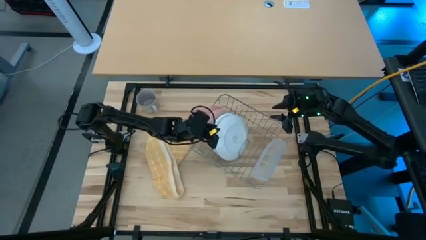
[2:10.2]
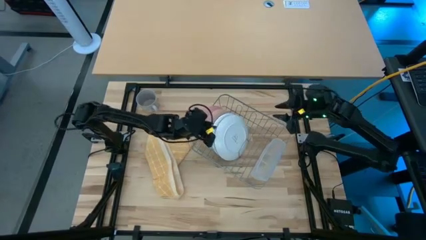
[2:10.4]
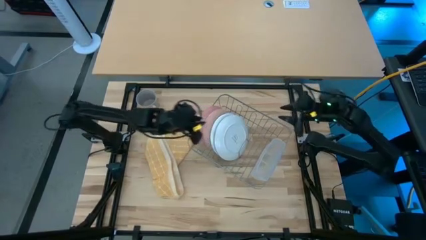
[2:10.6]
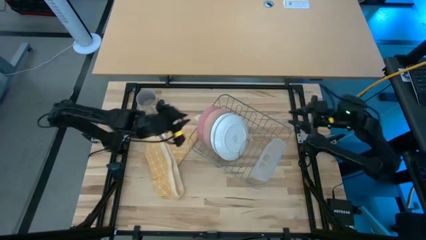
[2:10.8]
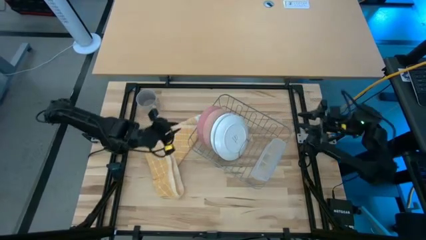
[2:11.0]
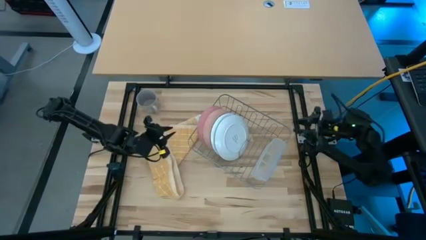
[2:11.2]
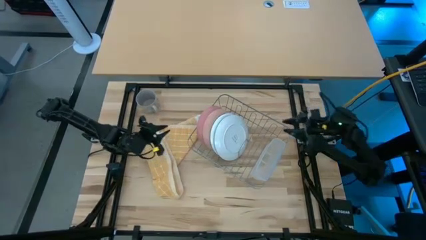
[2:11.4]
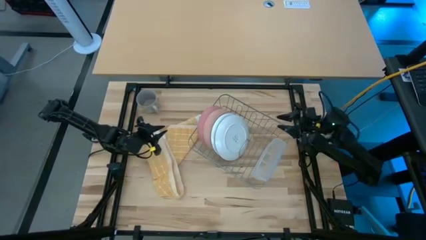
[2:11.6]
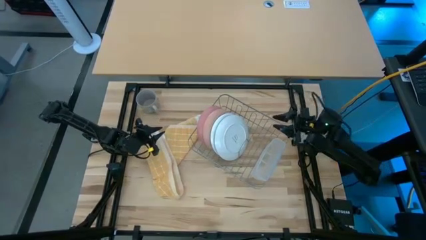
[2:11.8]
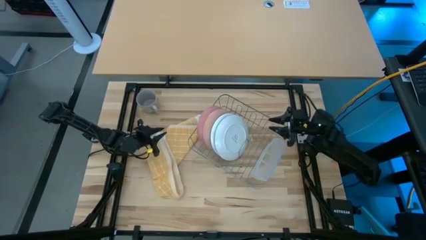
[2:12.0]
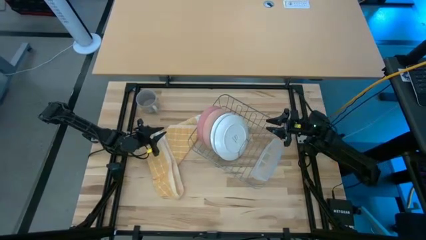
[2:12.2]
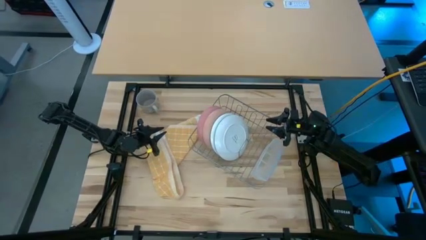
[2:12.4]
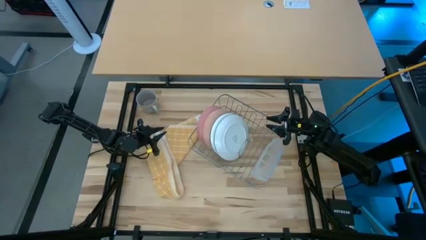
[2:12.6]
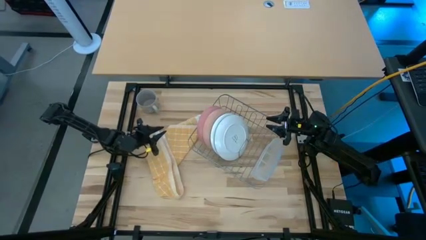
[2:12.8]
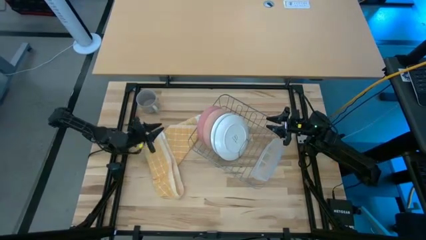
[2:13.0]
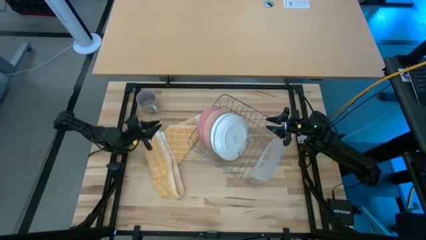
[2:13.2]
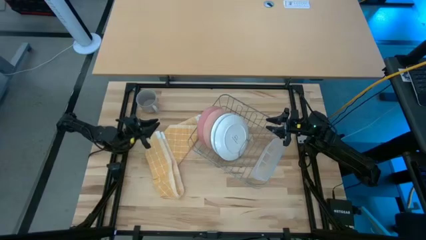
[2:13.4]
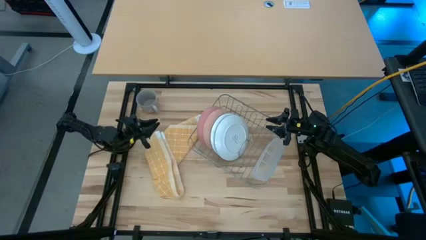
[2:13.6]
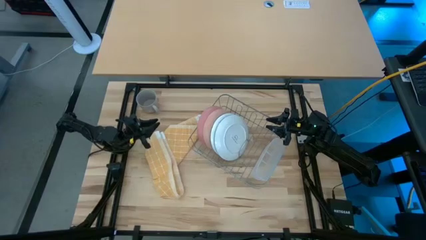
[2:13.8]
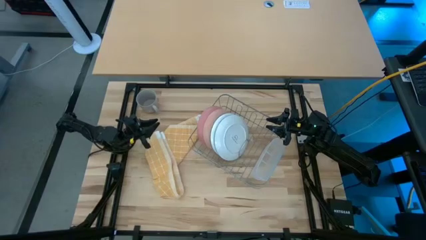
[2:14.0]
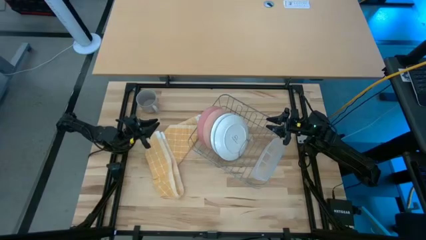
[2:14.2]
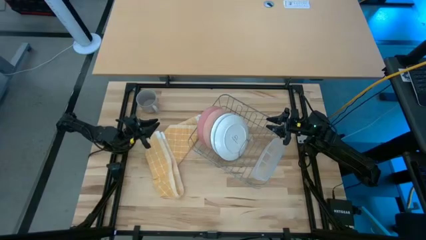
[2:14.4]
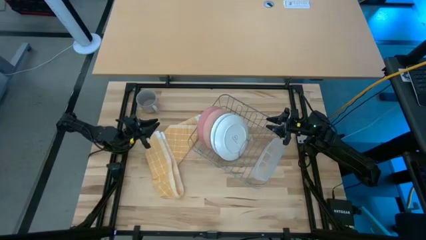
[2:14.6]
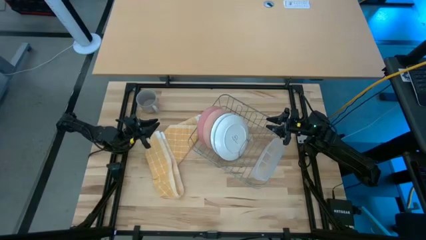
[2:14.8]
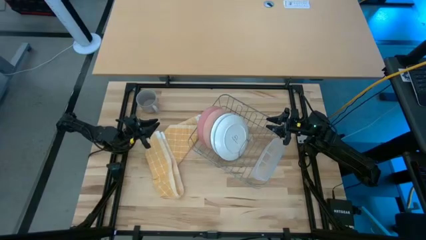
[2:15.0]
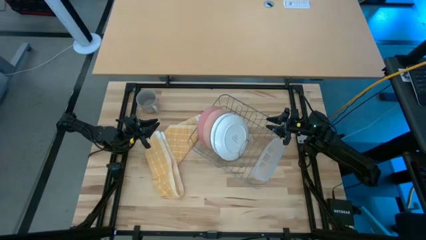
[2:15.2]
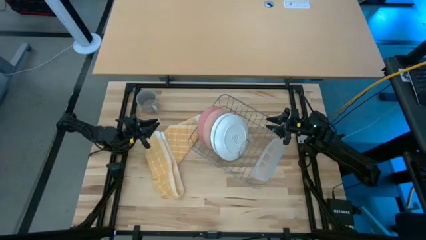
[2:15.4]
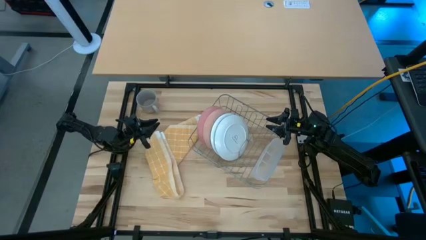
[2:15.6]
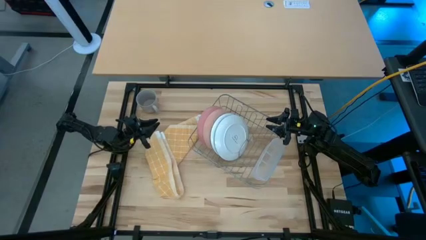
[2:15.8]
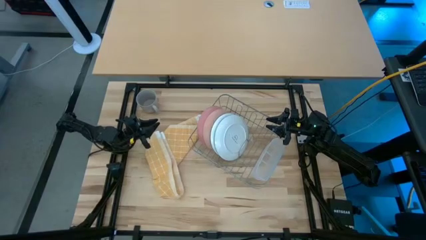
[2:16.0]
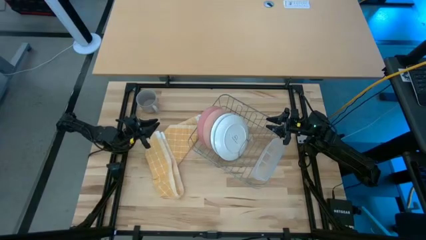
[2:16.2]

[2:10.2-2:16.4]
Task: Sort dishes
Return to Home Position

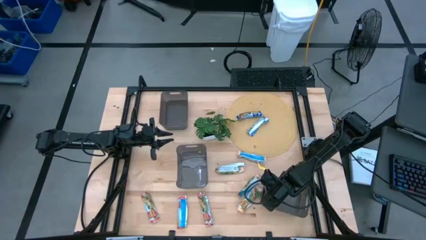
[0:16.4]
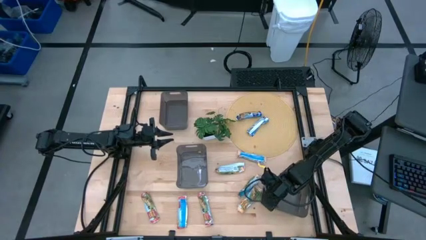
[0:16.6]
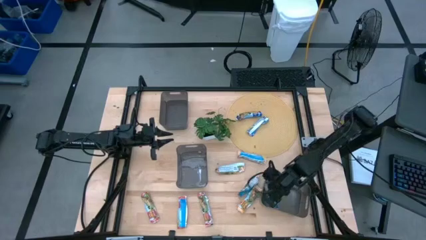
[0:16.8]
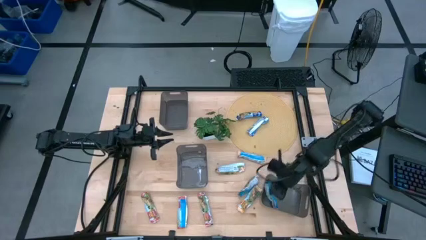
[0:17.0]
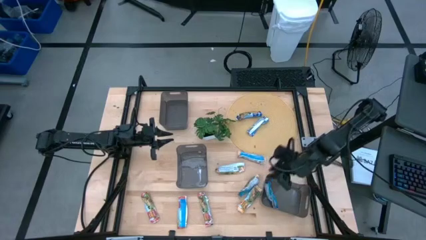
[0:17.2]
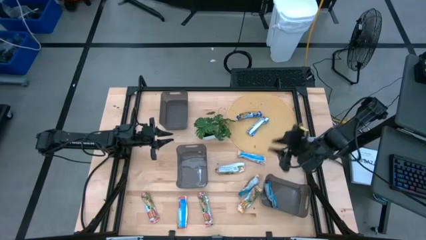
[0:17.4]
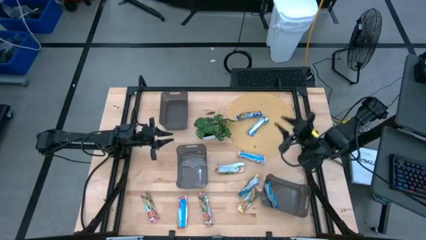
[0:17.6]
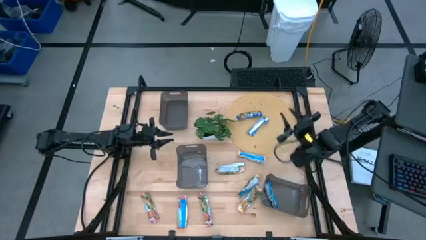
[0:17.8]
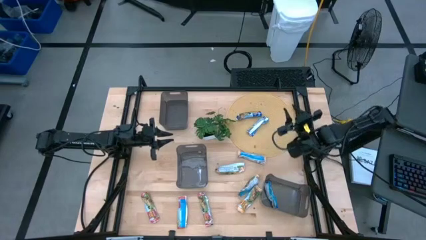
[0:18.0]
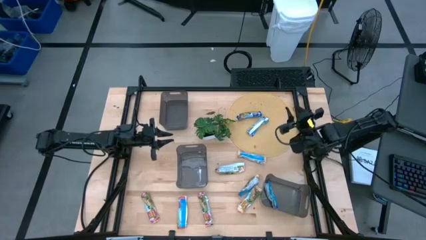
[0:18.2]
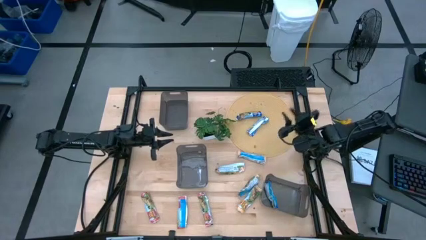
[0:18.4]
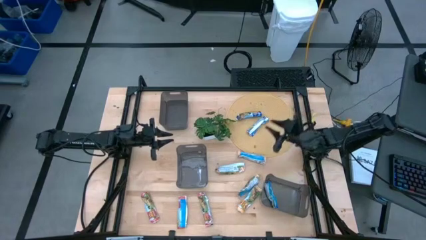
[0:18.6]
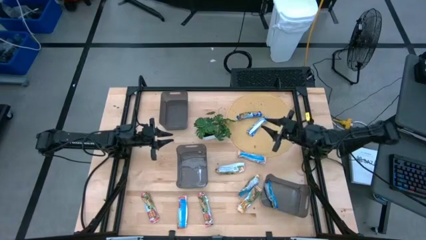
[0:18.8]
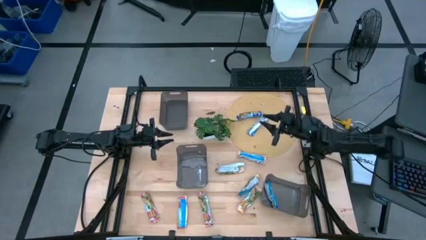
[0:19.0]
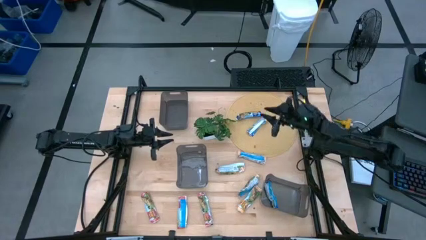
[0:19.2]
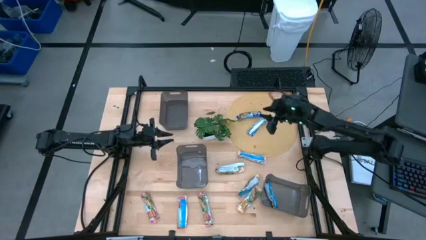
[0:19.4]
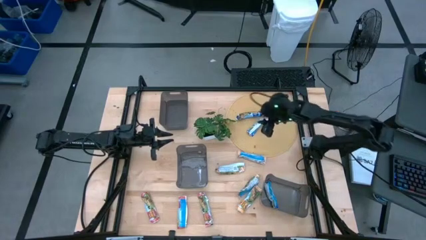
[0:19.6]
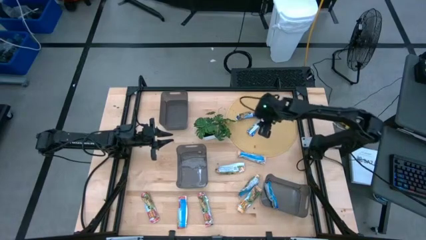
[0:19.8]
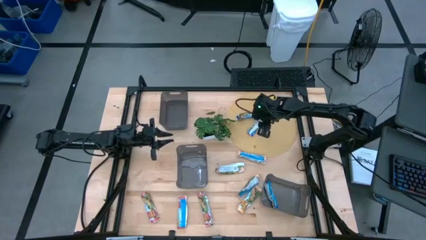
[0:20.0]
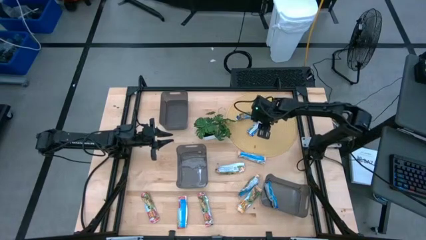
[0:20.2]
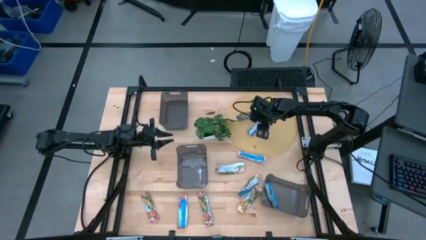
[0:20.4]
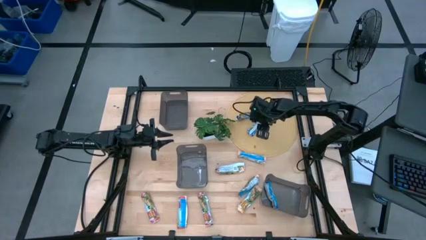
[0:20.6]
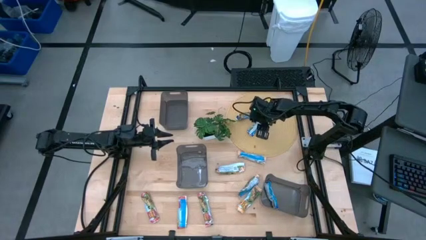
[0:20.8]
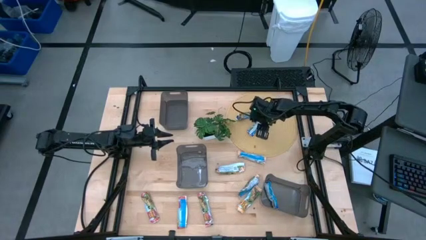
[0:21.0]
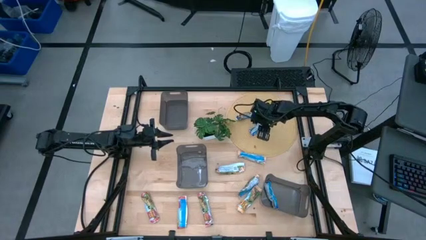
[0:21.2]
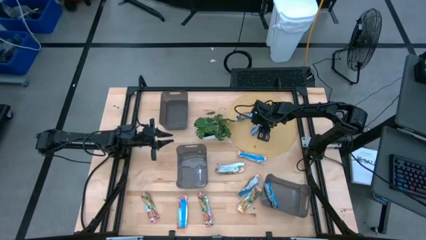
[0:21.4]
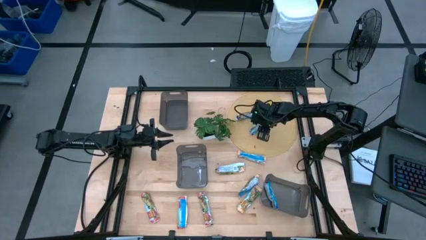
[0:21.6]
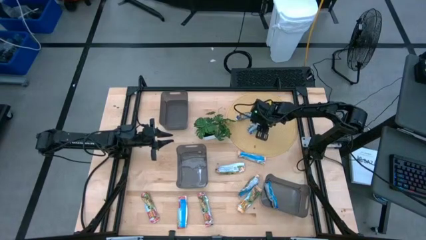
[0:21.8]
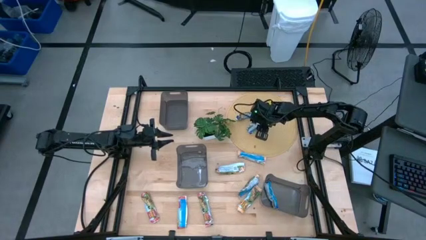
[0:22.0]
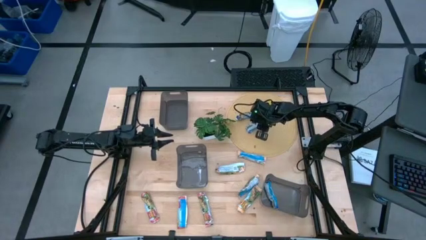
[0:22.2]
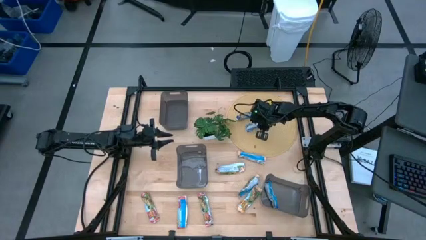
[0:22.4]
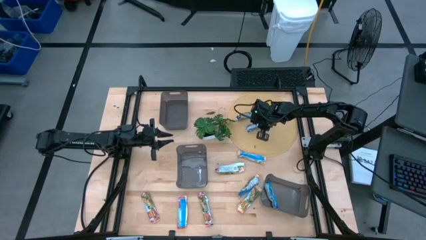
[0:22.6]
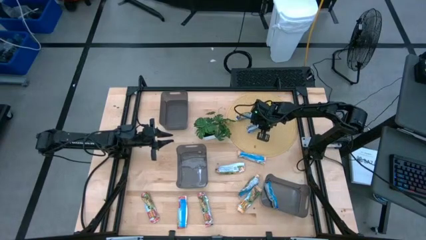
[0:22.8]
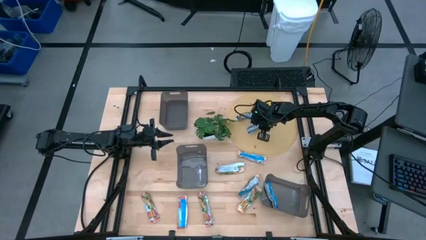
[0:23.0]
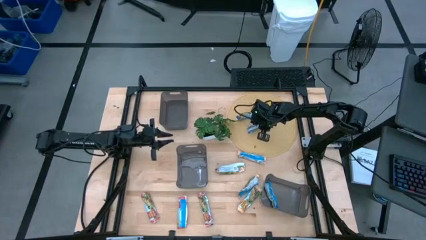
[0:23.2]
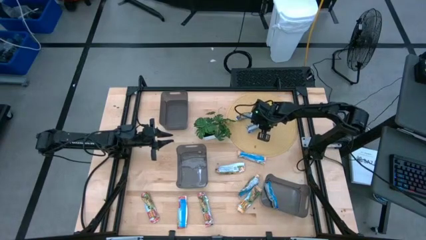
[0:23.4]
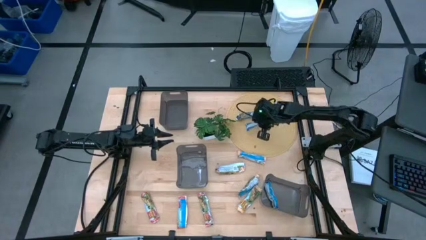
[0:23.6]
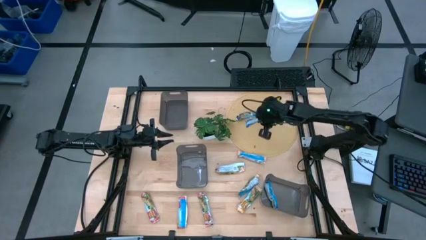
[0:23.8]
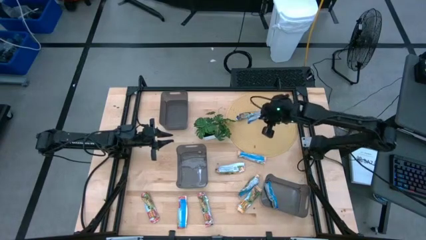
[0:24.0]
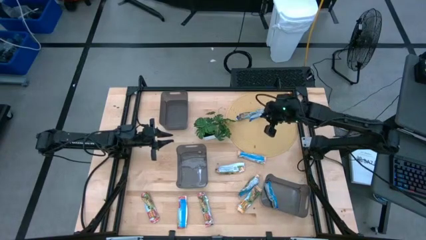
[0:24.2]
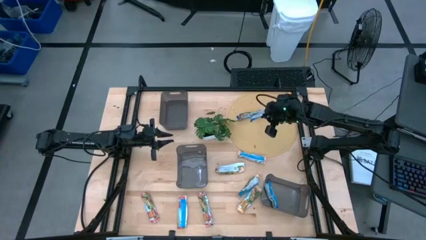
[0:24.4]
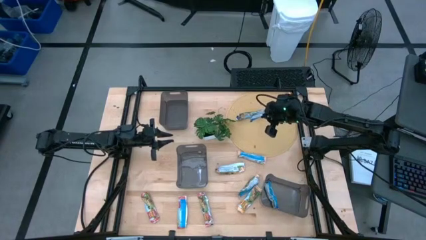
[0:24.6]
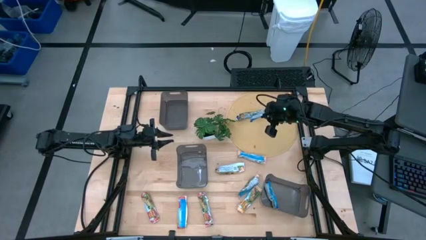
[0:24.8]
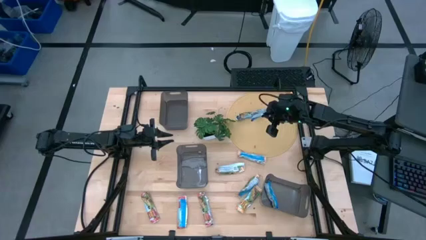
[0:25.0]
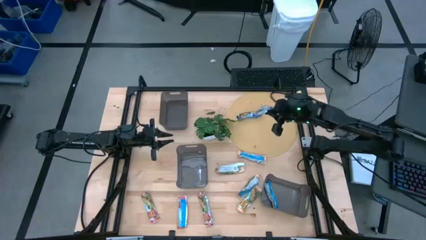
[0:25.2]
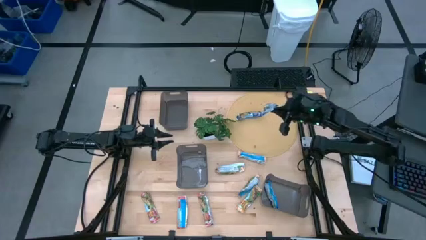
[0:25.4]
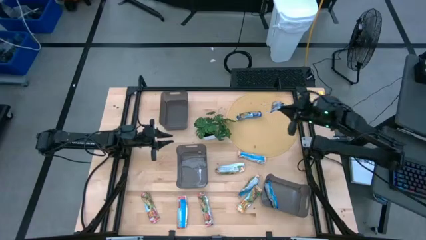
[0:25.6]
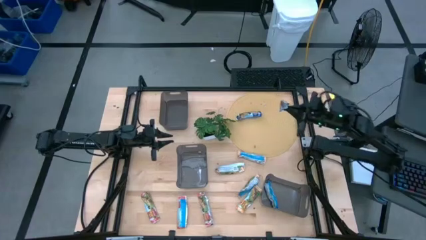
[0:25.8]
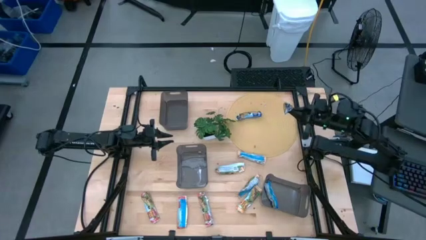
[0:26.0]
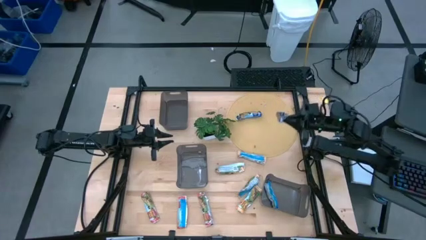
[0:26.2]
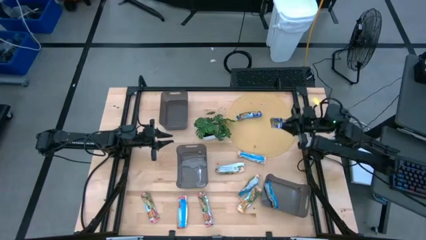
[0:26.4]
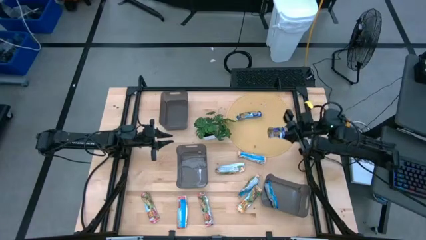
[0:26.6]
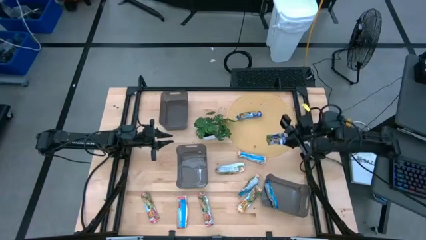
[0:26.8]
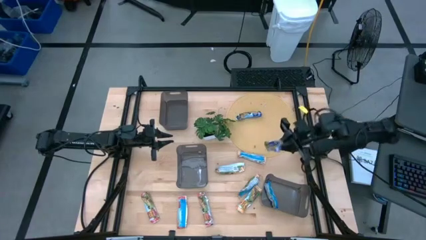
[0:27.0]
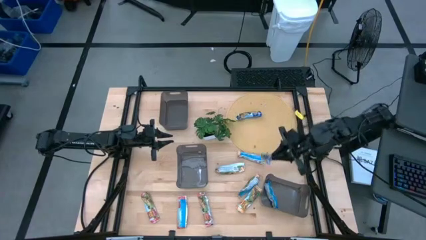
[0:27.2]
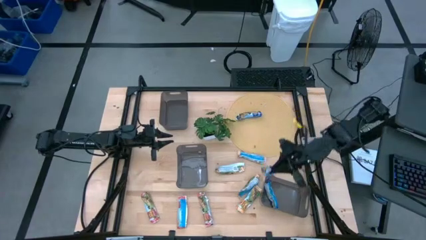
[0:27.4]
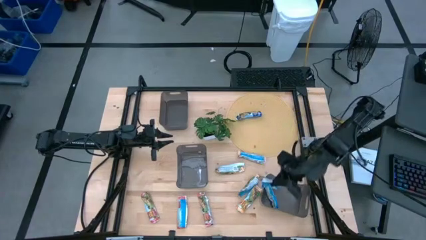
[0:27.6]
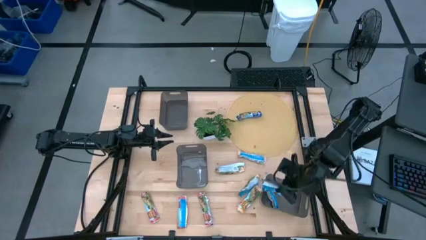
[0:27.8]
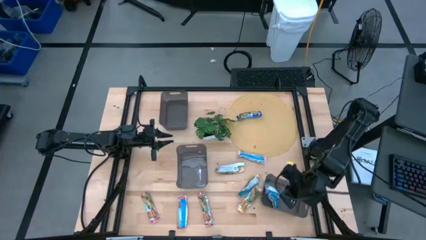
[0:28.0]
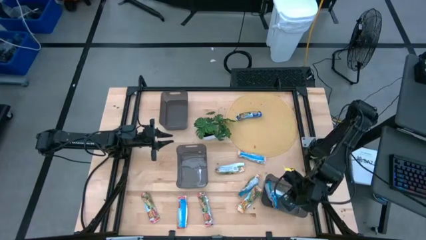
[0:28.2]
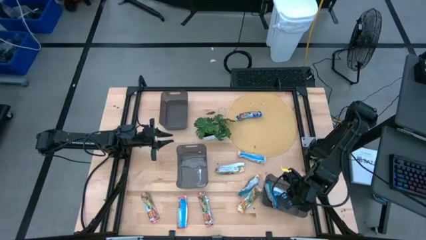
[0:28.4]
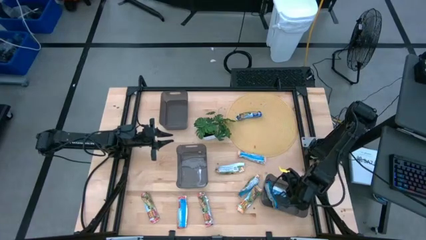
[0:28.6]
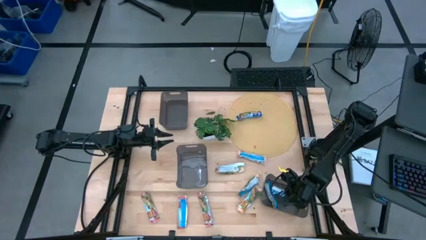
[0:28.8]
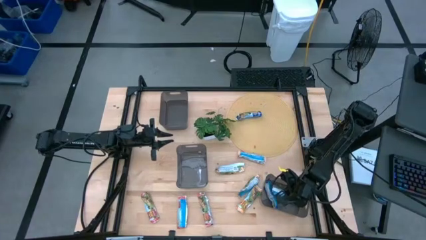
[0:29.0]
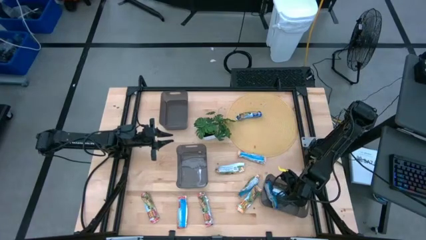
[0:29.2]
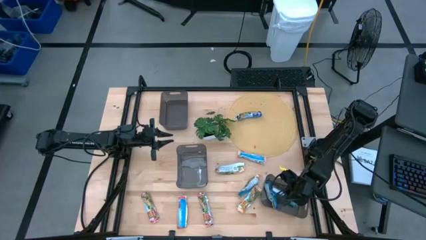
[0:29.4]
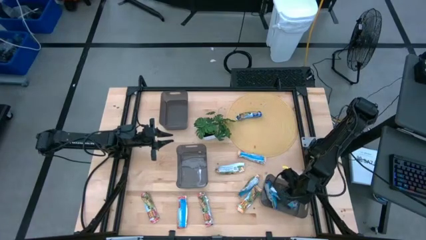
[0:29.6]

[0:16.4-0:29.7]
Task: Pick and place Granola Bars by type
Put the bottom blue granola bar into the bottom right black bin
